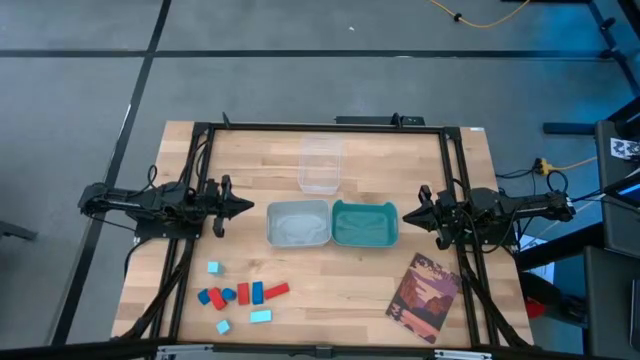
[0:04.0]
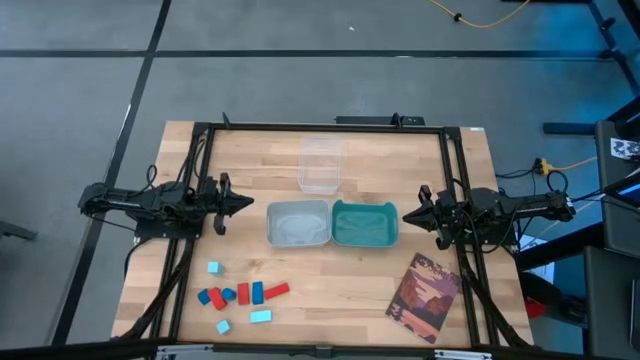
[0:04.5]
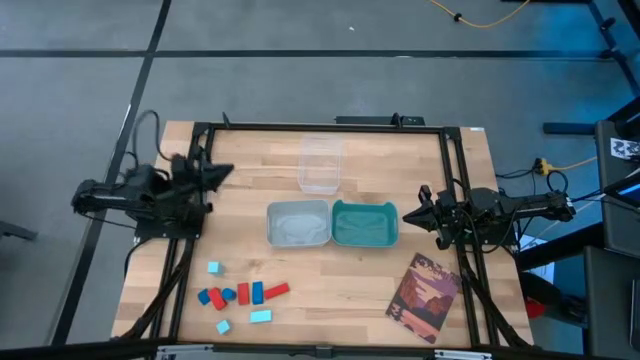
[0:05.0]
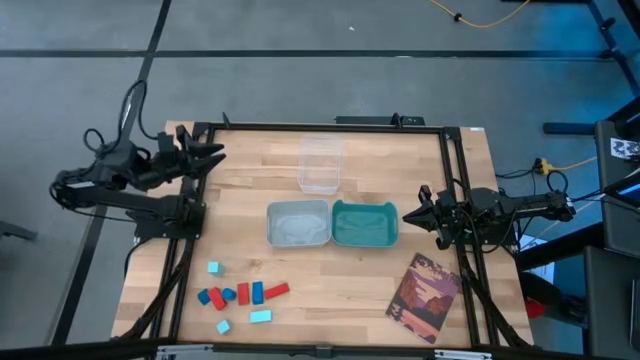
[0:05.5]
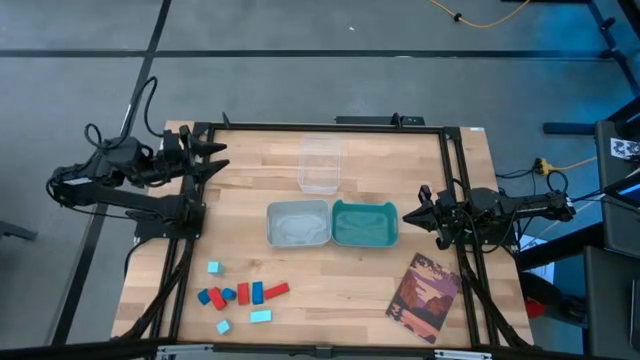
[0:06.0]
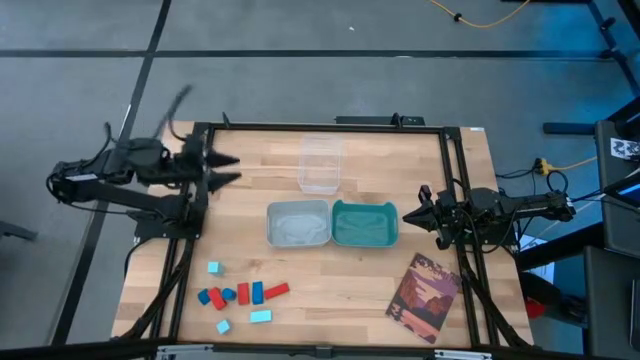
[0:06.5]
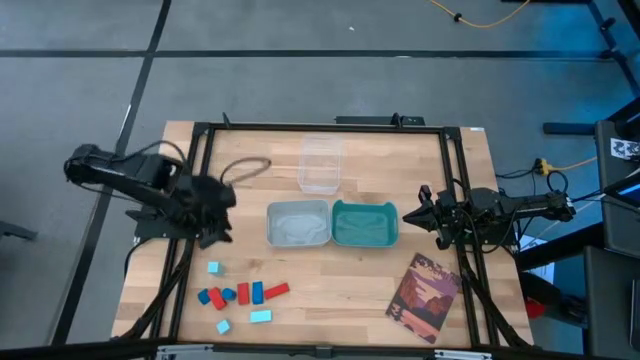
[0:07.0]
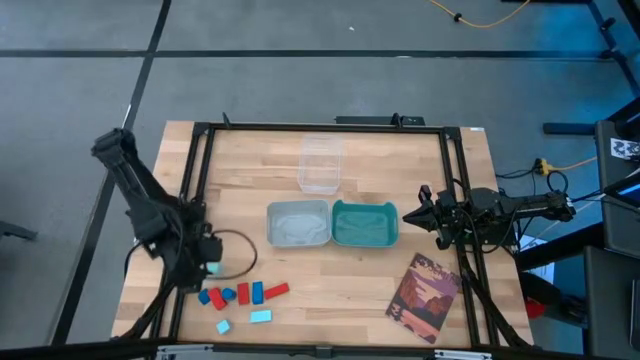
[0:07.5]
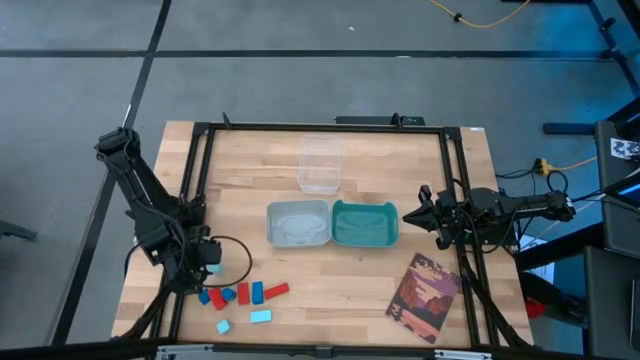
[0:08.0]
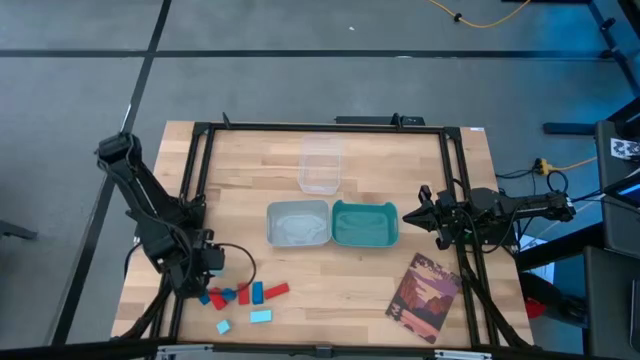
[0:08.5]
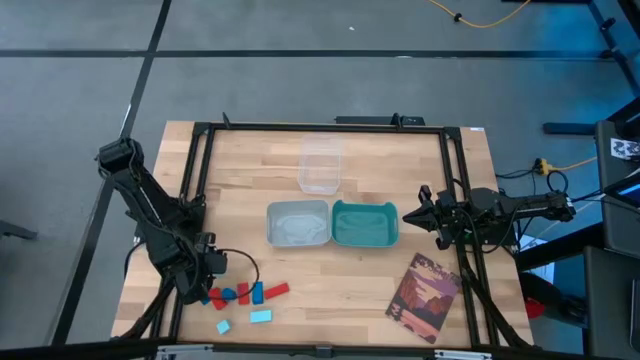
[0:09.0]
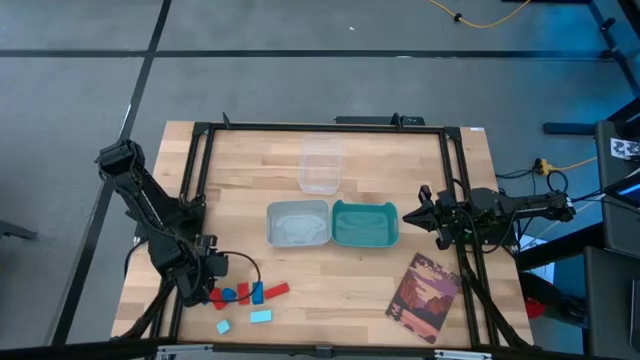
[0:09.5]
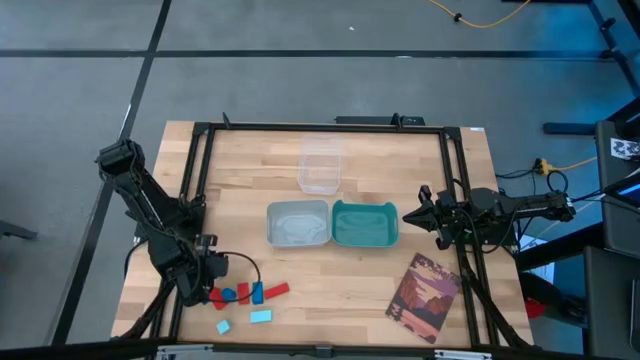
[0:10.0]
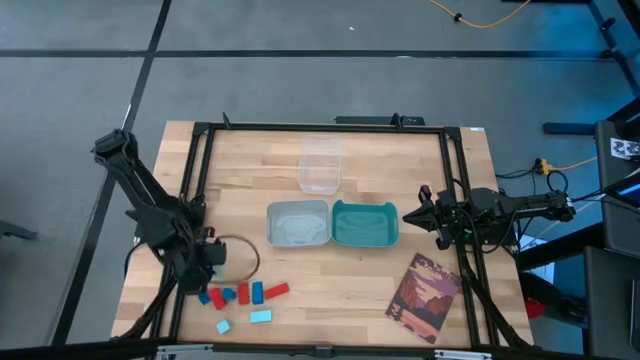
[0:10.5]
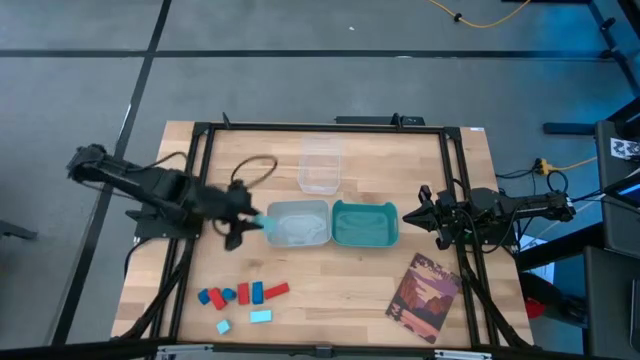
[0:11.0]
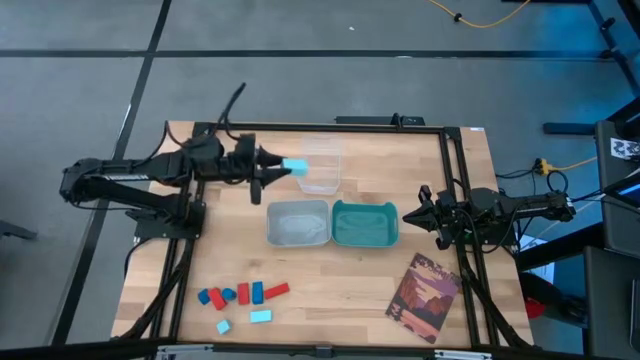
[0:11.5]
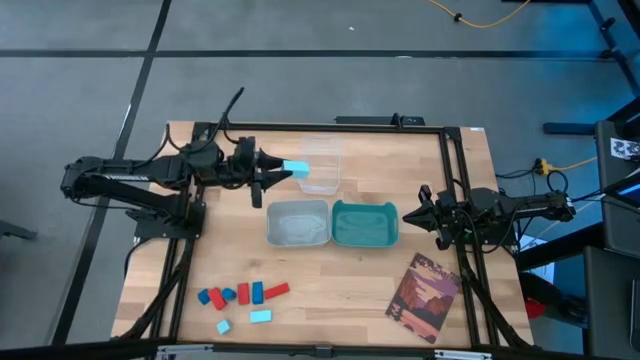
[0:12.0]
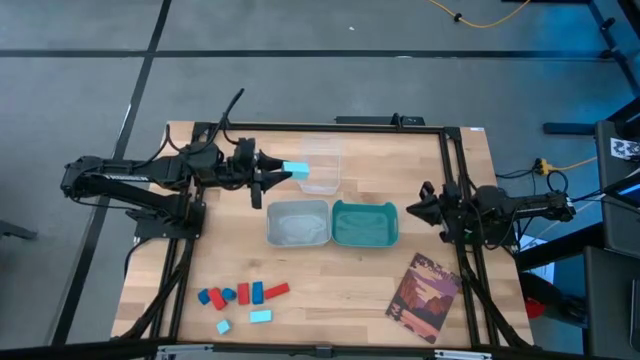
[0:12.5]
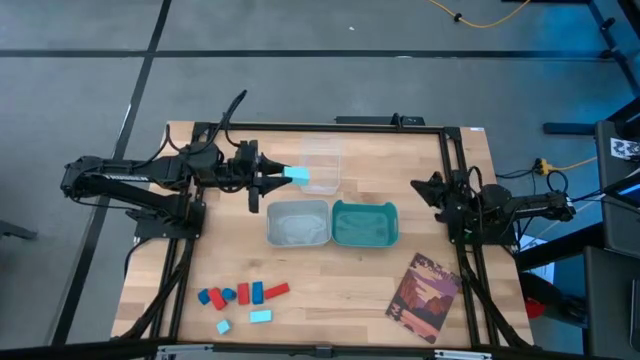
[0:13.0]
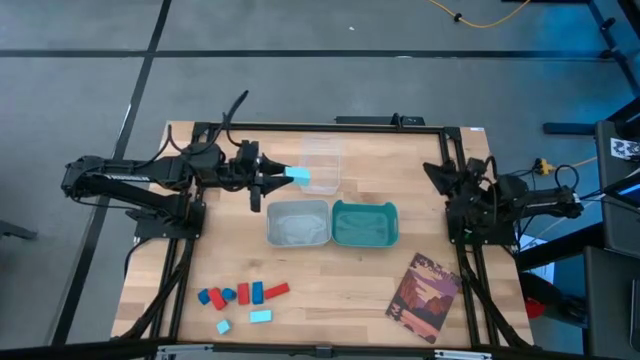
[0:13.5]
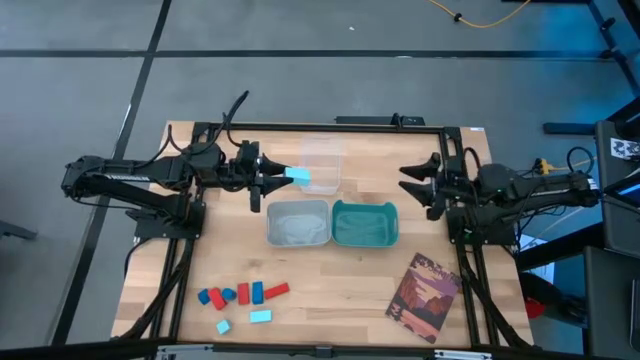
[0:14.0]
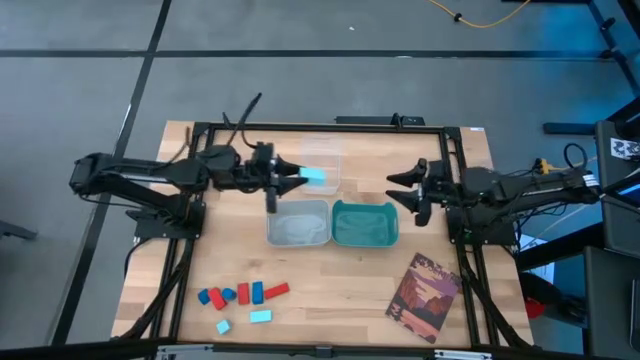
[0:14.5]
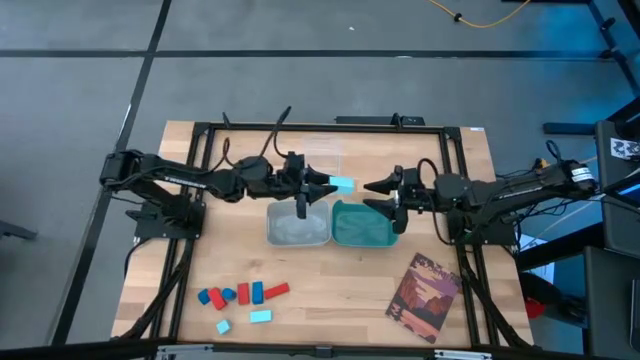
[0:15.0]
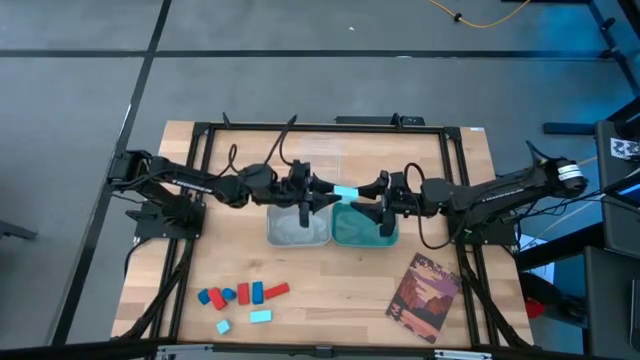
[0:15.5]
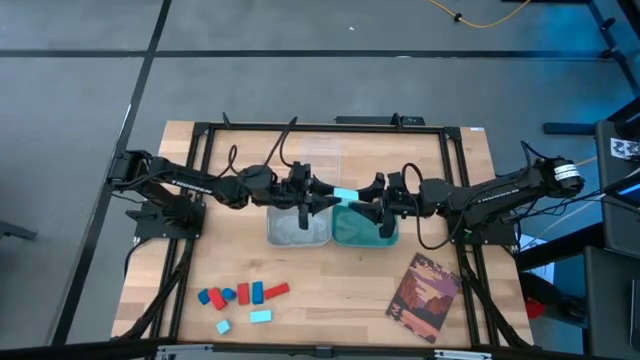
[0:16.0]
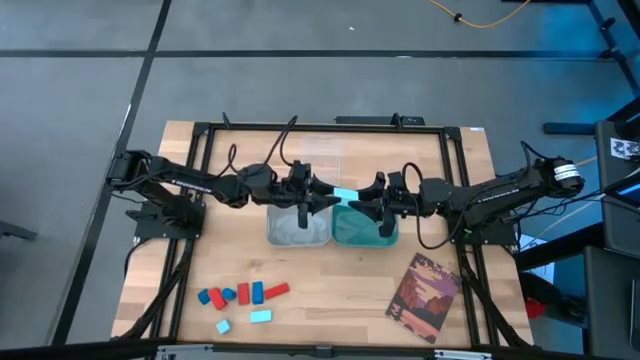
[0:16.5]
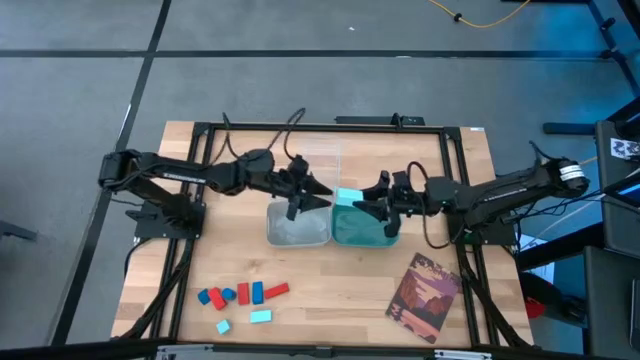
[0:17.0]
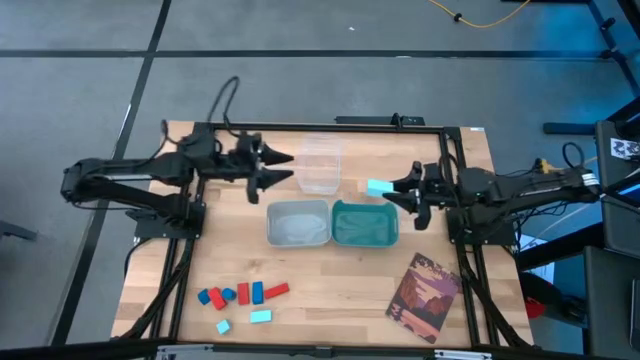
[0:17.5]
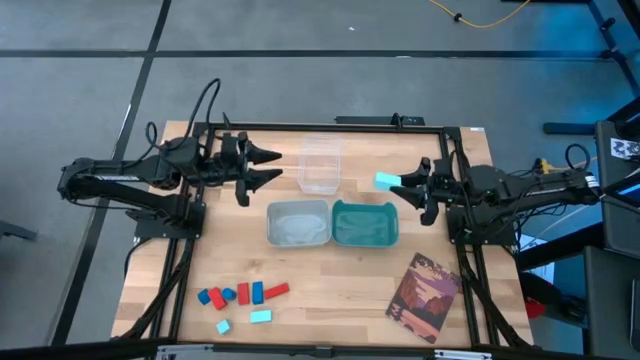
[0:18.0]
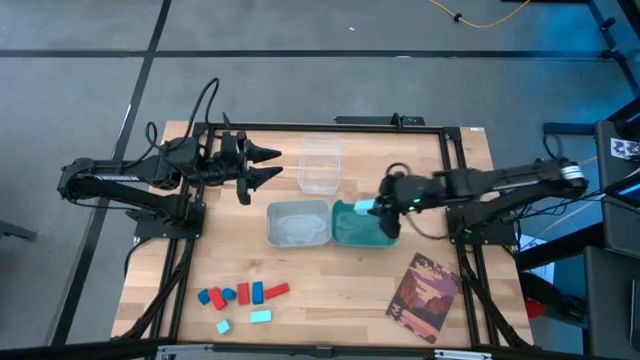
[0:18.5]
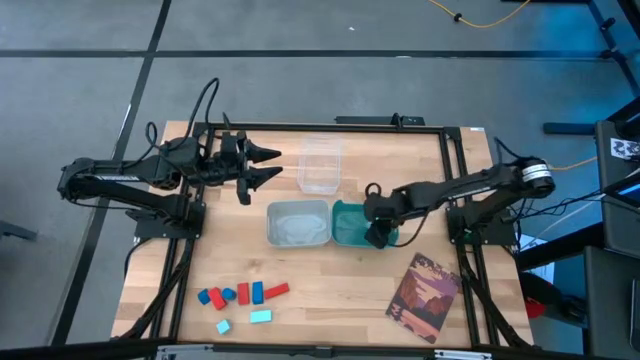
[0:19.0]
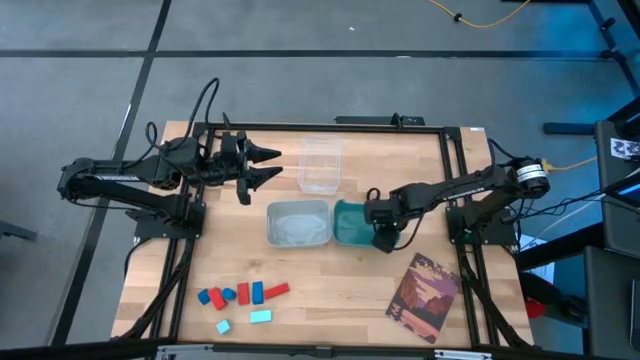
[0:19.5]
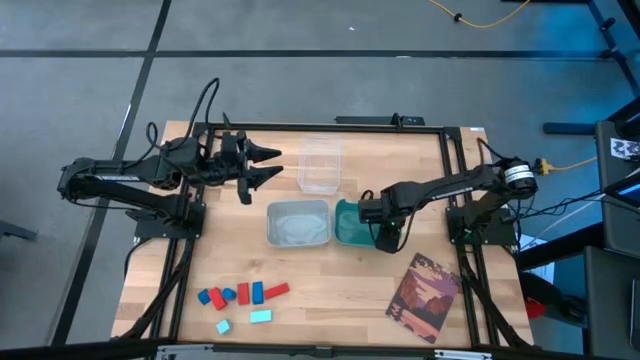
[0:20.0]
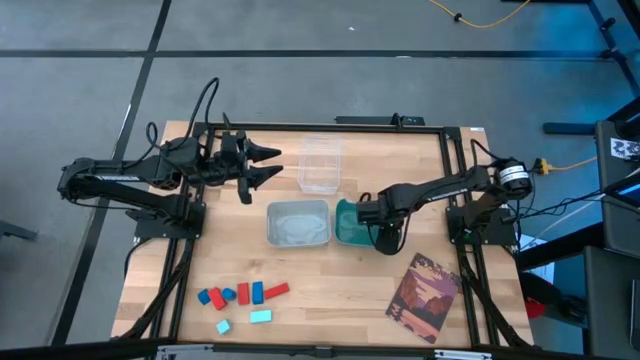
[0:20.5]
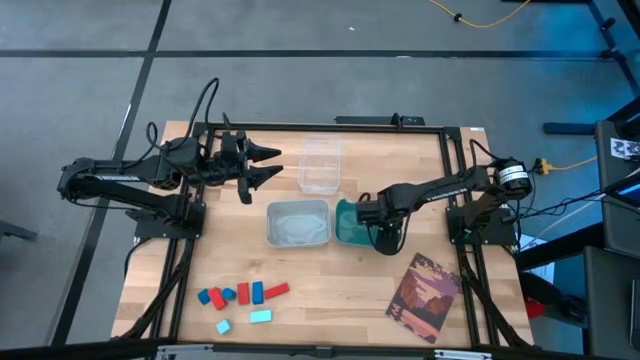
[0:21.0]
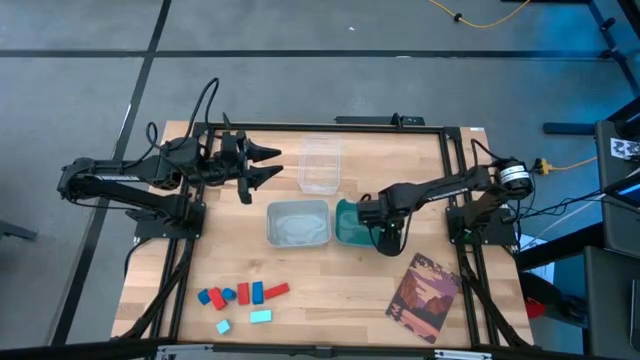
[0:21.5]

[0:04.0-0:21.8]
Task: Sort & place blocks by color
Put the top left light blue block into the green bin

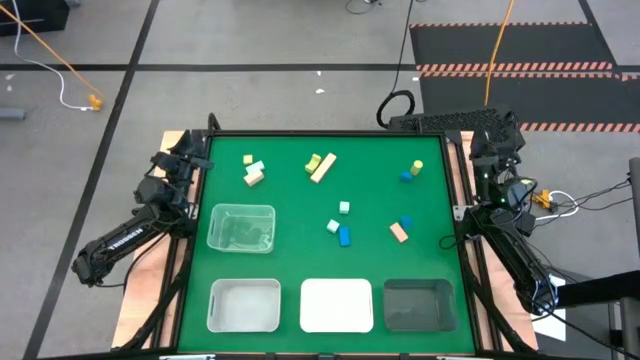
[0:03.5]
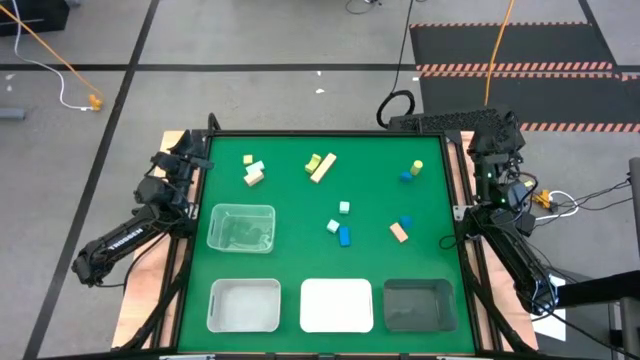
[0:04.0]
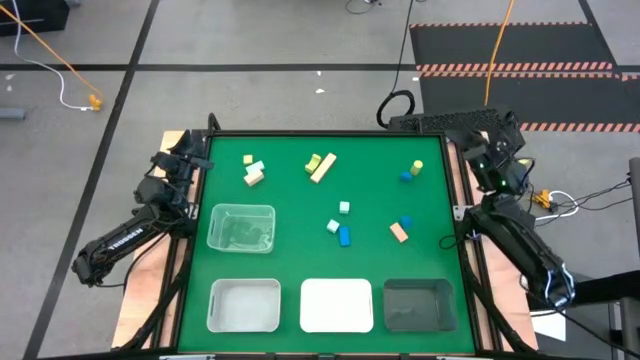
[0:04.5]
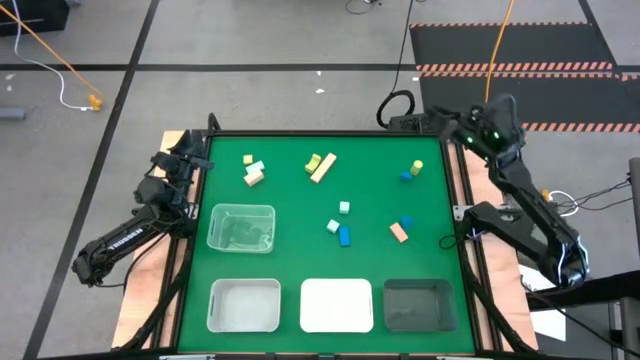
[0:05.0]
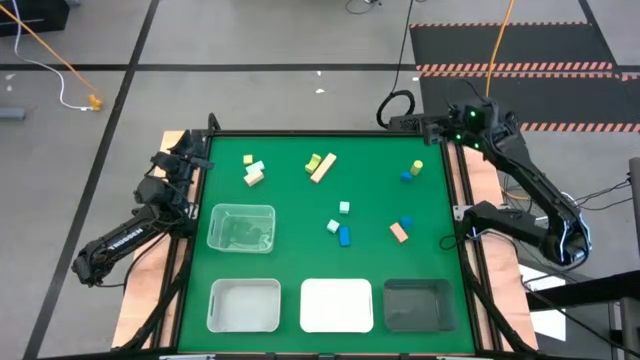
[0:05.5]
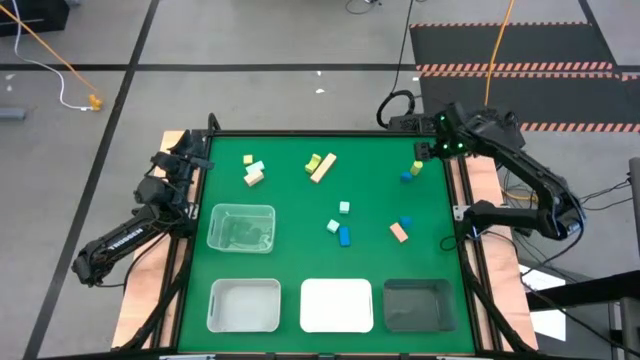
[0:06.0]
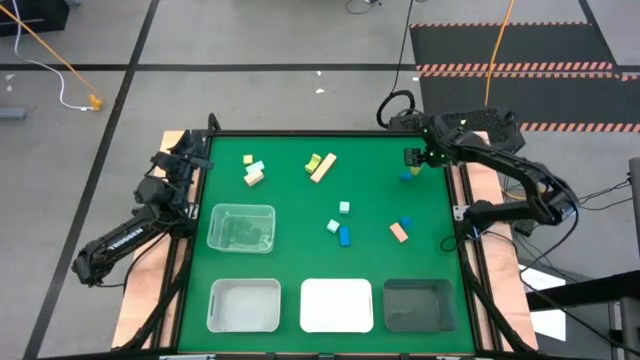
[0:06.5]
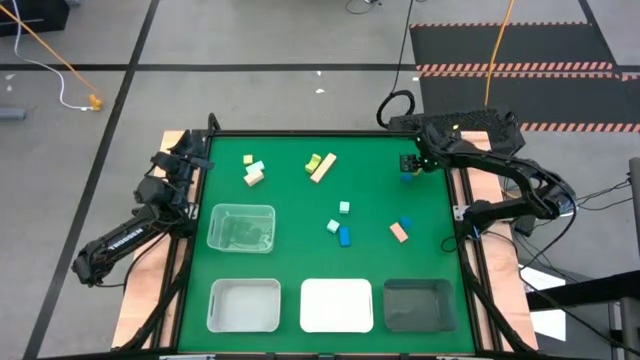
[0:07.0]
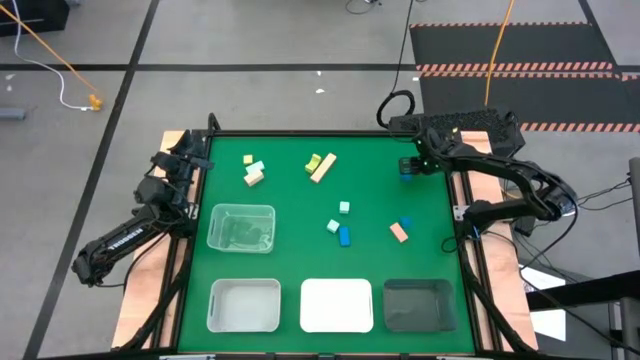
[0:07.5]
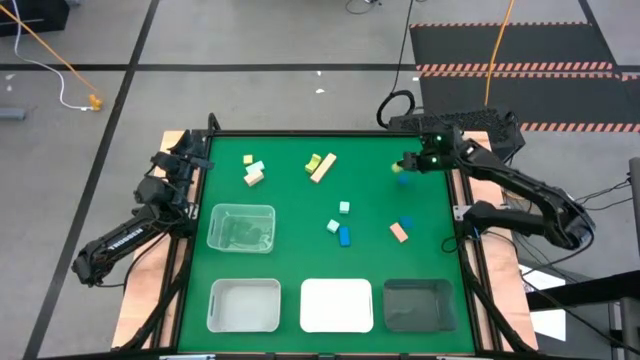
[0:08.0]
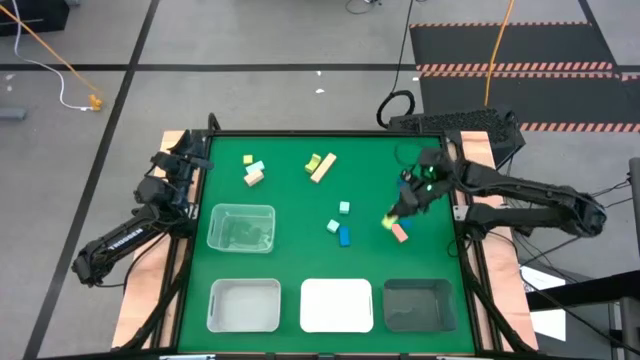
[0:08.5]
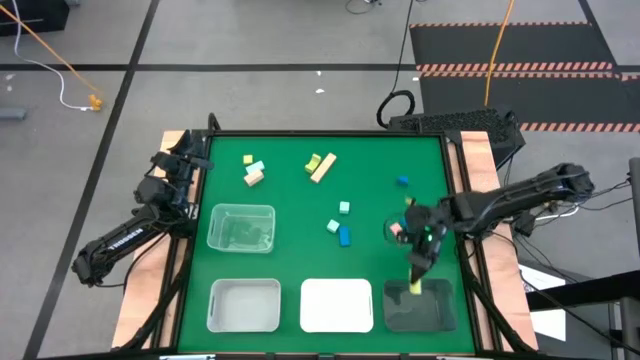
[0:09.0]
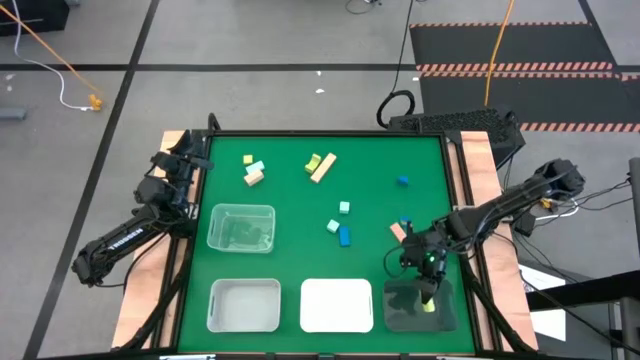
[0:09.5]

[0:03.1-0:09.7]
Task: Sort & place blocks by color
Put the right green block into the black bin
